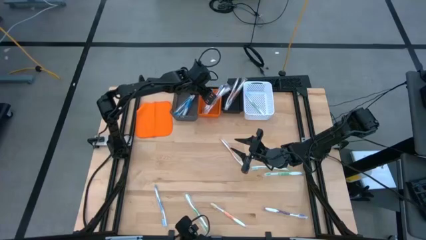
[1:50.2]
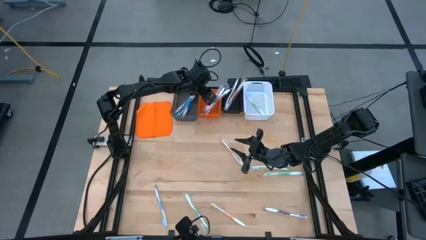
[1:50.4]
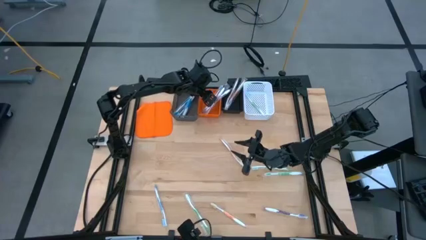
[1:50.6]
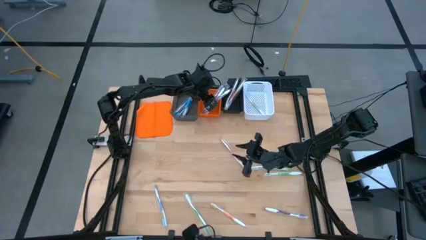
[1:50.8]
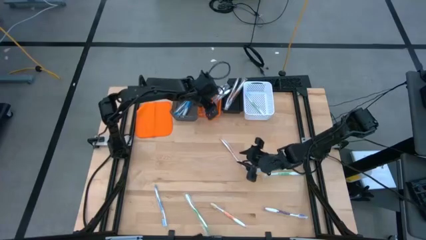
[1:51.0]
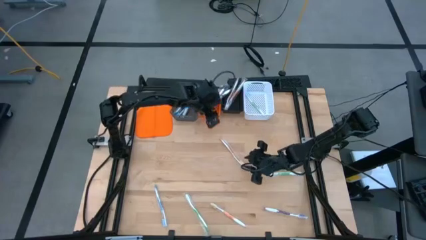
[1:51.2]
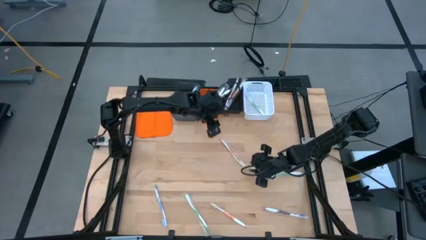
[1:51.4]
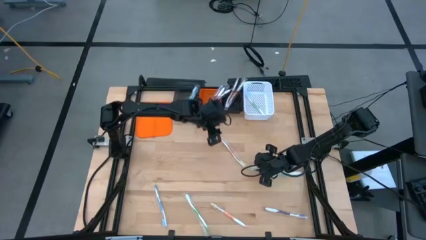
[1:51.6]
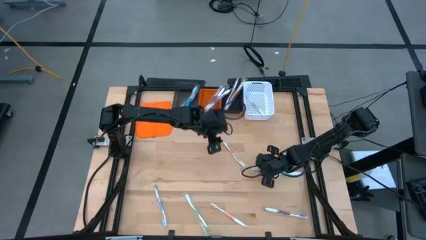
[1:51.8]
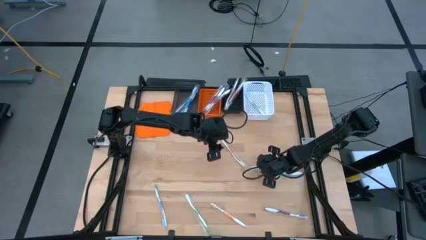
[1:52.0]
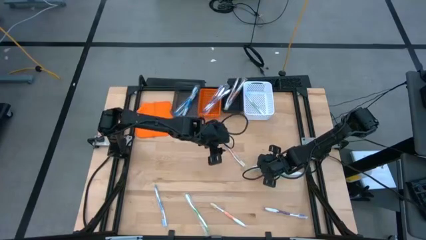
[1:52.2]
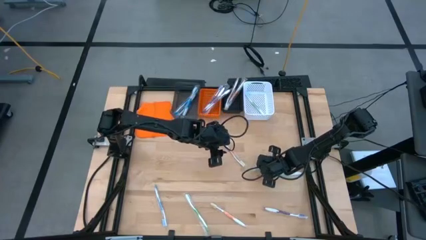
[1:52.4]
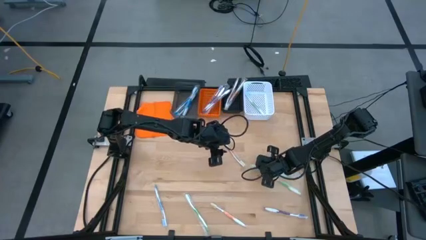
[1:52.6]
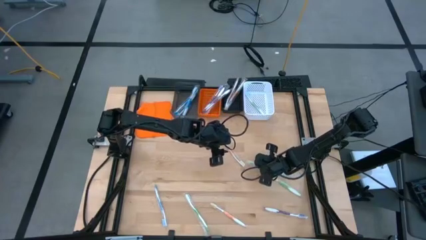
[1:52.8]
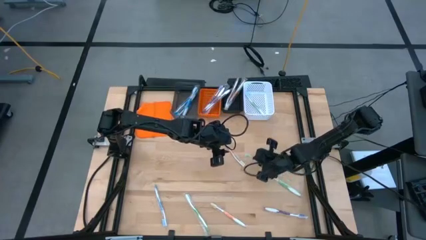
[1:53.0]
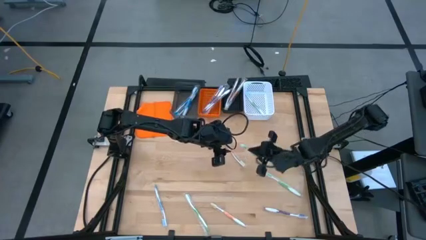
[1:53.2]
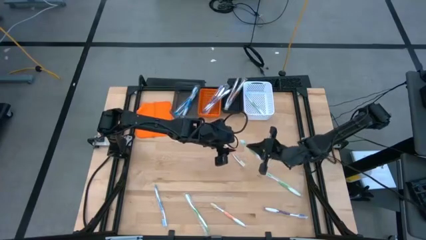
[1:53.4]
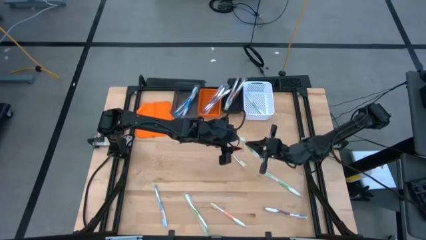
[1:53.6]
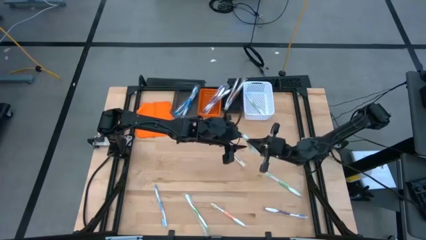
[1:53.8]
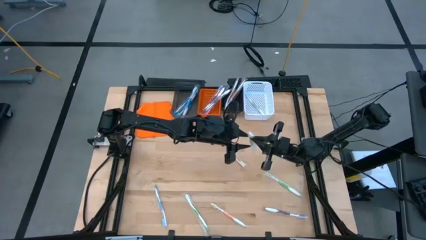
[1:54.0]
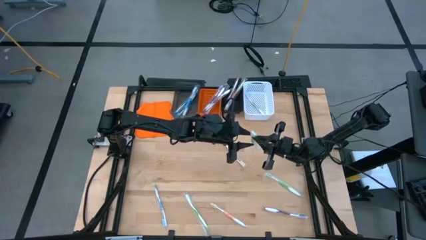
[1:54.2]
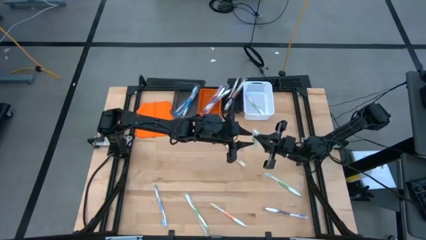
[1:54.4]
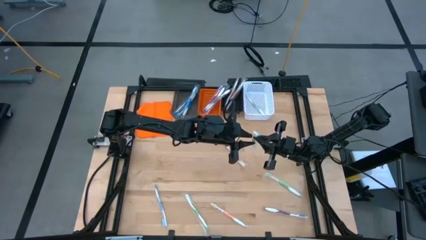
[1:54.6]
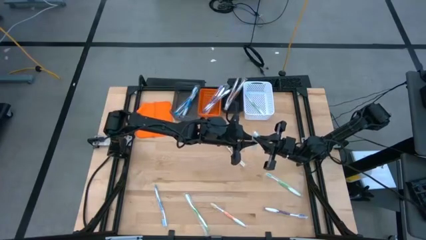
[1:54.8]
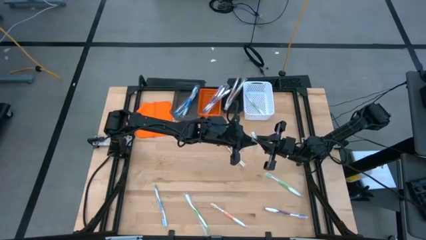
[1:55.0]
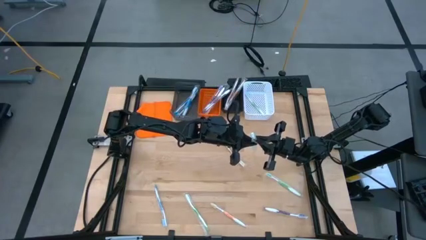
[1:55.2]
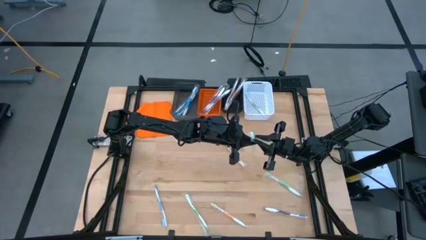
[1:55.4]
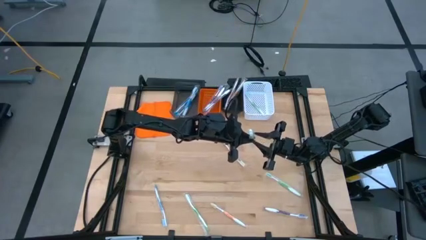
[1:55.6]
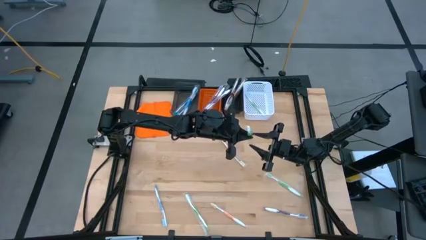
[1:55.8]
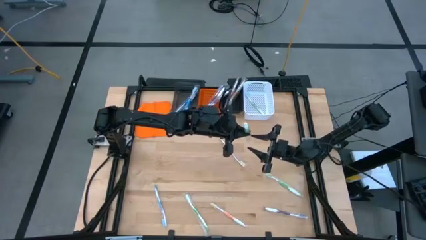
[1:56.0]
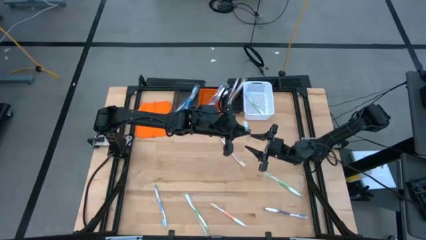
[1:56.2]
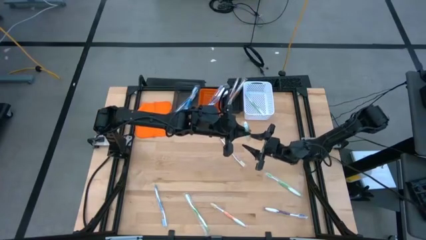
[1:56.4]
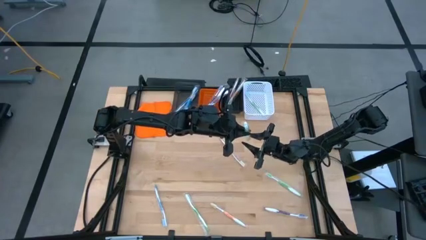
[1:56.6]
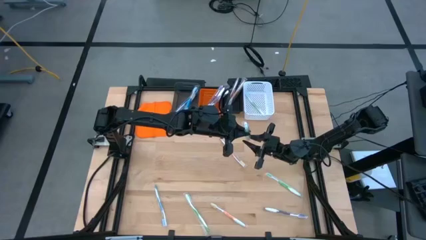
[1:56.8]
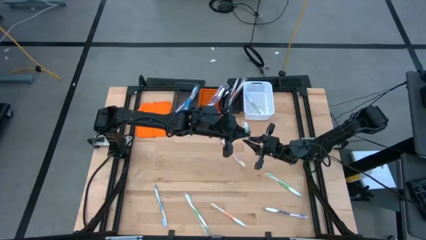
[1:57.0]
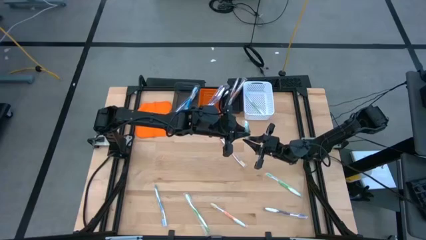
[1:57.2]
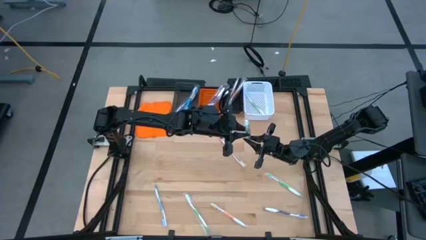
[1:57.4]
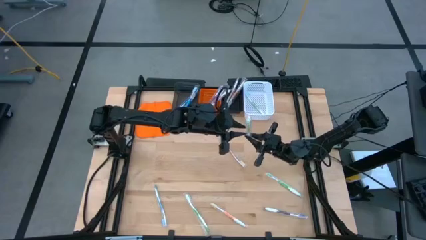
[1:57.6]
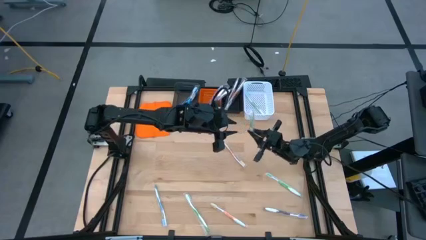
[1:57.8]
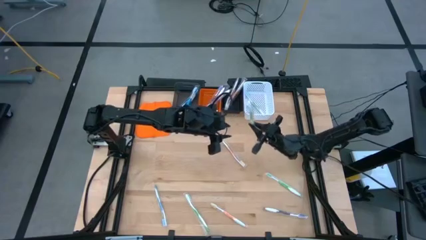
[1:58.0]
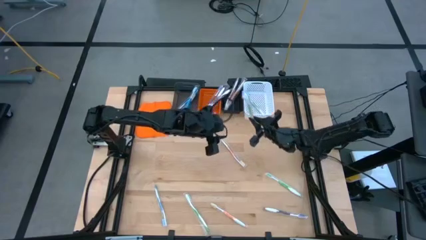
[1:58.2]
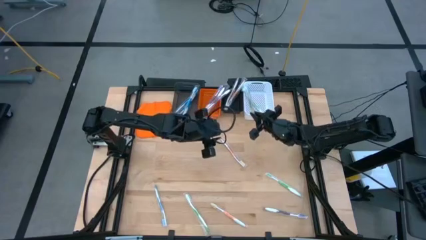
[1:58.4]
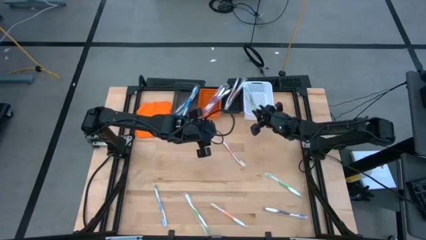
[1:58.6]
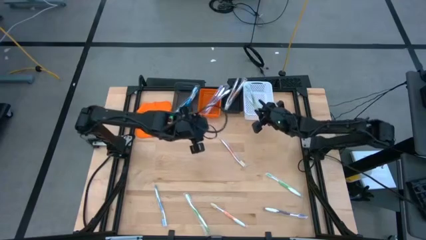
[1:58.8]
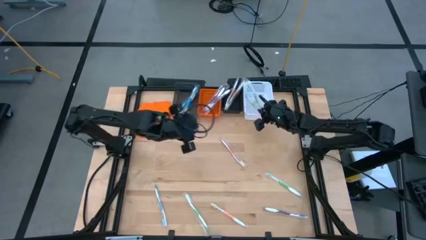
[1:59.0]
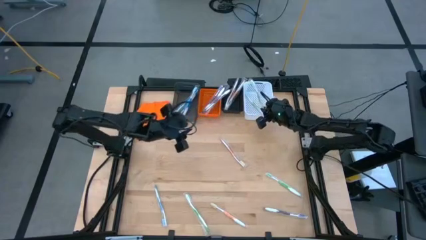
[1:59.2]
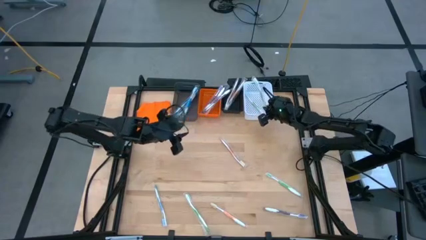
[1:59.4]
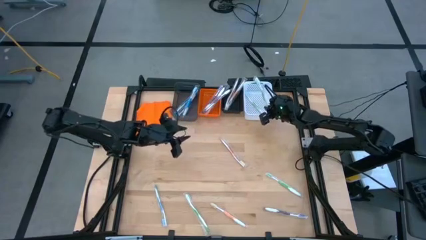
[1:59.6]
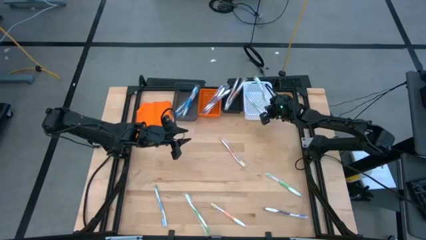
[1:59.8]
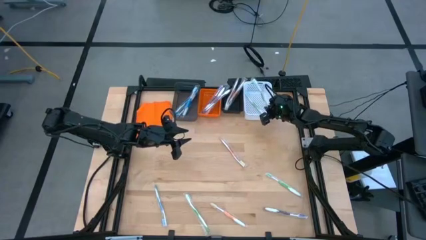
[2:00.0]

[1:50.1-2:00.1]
Task: Pick & Place Toothbrushes
Put the green toothbrush into the white bin

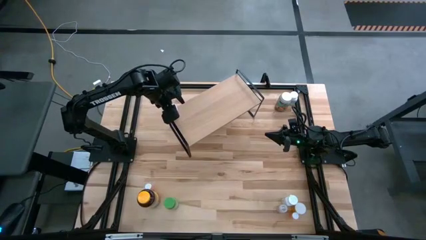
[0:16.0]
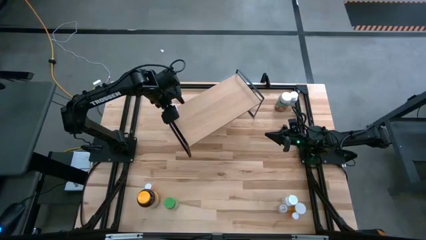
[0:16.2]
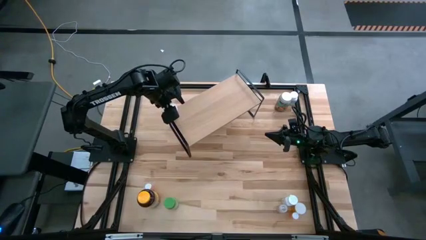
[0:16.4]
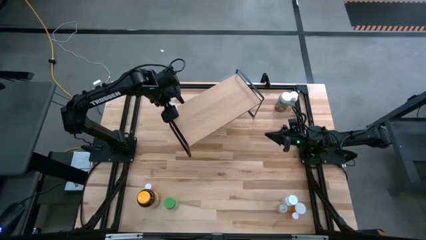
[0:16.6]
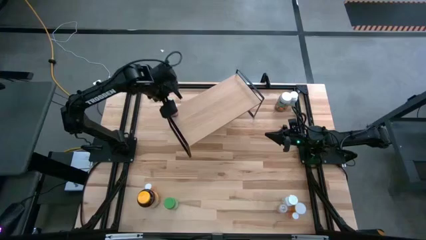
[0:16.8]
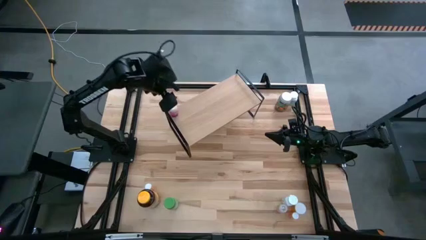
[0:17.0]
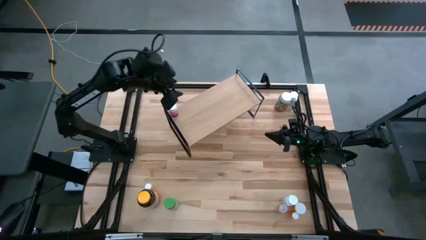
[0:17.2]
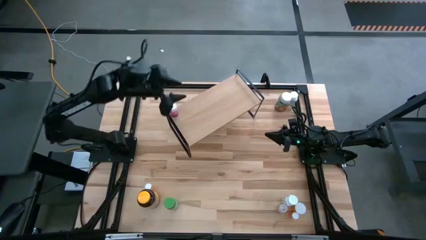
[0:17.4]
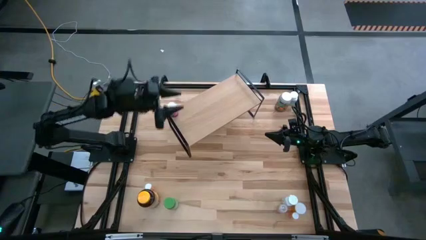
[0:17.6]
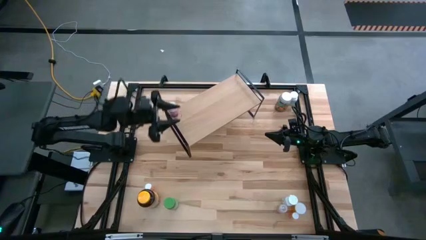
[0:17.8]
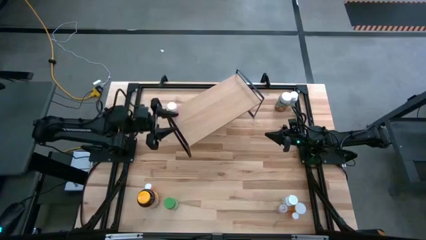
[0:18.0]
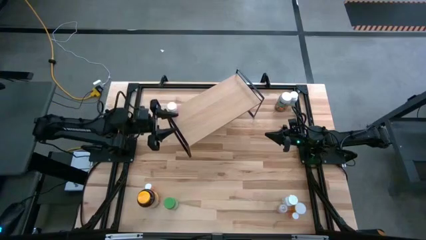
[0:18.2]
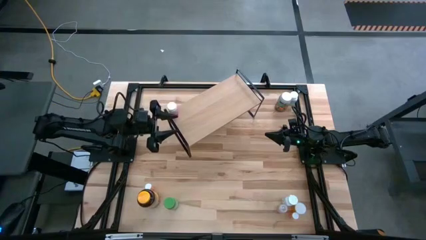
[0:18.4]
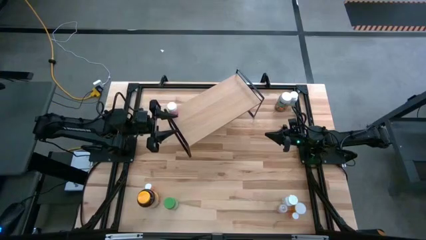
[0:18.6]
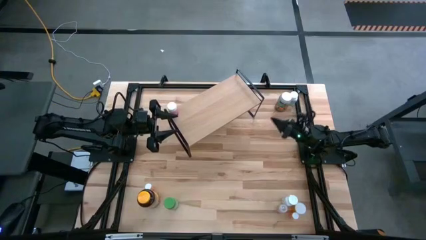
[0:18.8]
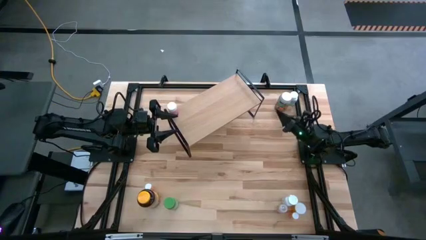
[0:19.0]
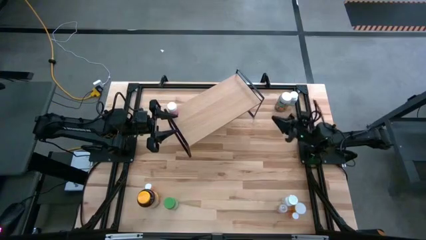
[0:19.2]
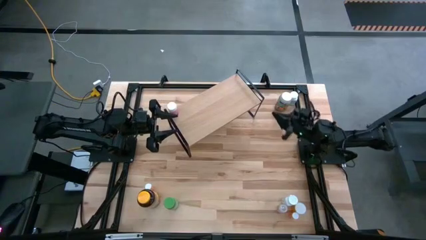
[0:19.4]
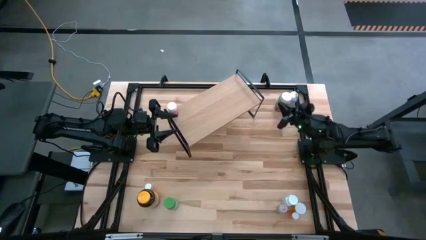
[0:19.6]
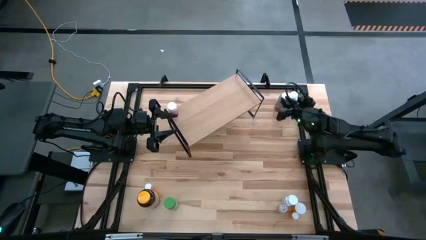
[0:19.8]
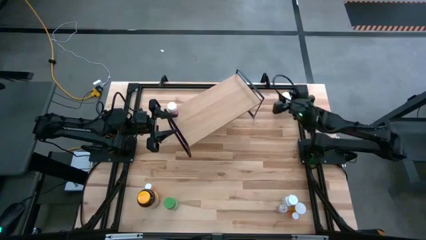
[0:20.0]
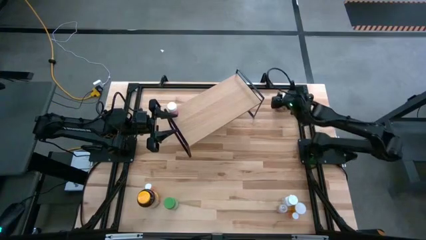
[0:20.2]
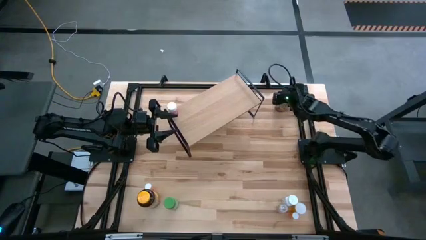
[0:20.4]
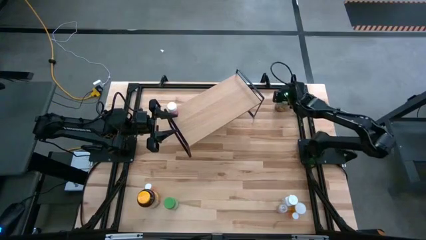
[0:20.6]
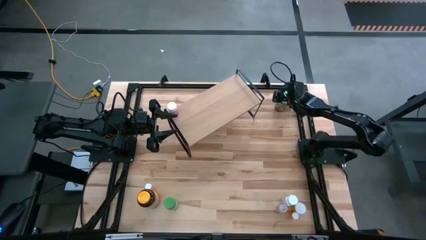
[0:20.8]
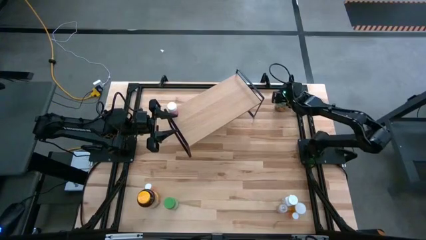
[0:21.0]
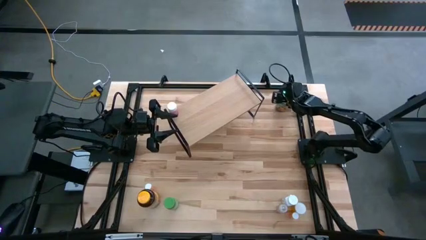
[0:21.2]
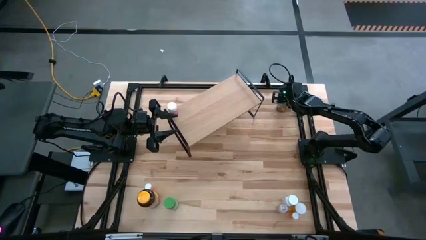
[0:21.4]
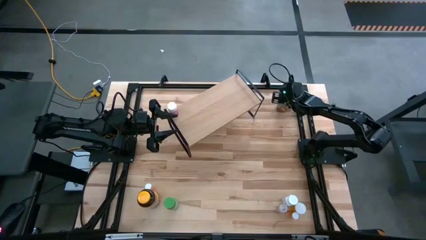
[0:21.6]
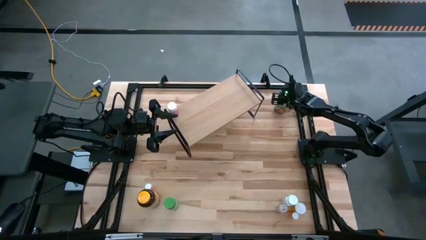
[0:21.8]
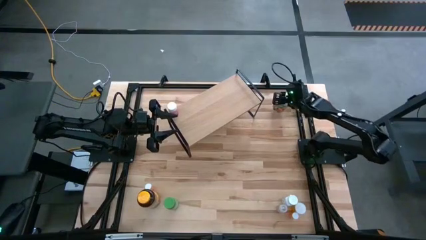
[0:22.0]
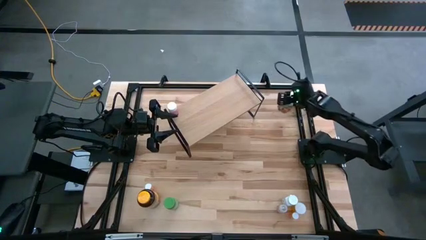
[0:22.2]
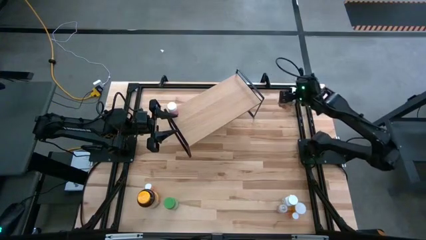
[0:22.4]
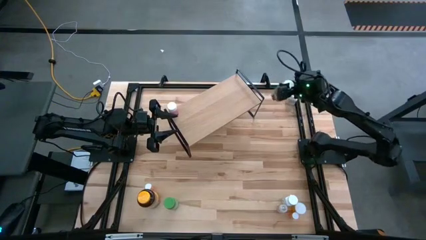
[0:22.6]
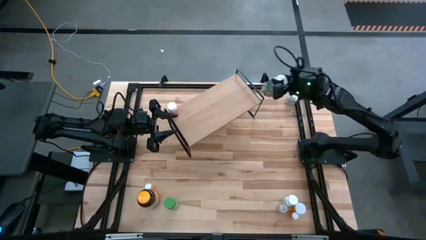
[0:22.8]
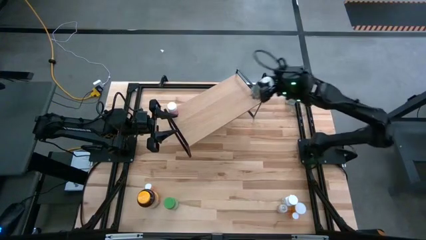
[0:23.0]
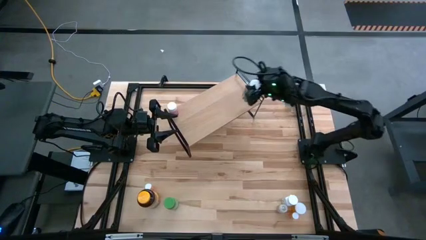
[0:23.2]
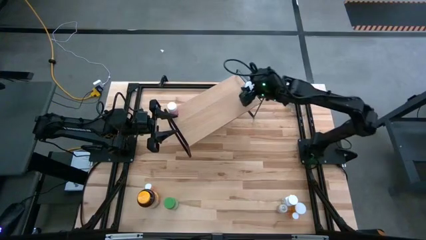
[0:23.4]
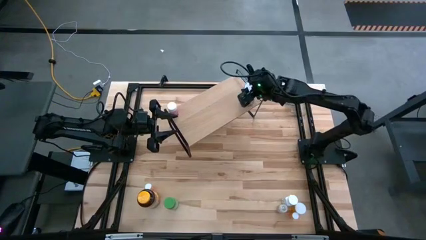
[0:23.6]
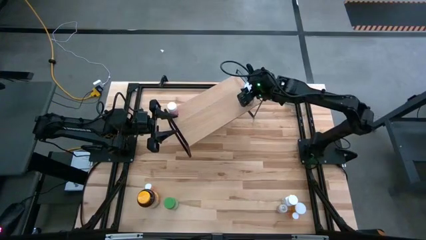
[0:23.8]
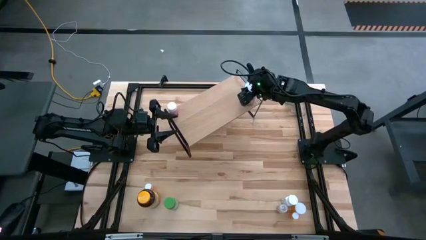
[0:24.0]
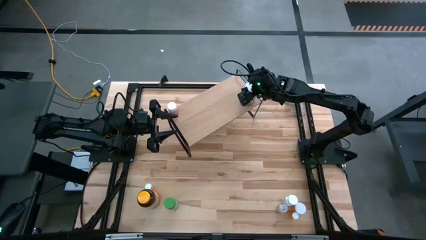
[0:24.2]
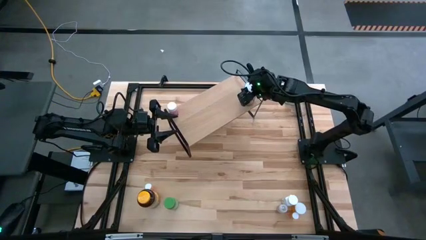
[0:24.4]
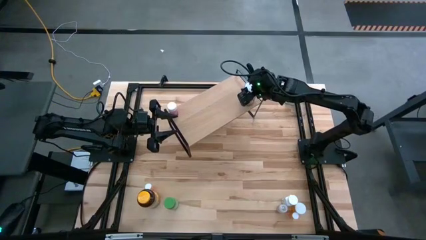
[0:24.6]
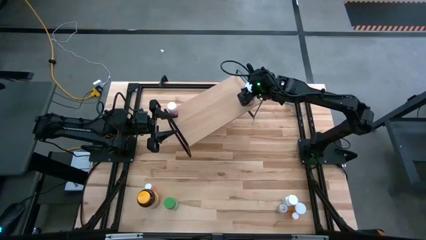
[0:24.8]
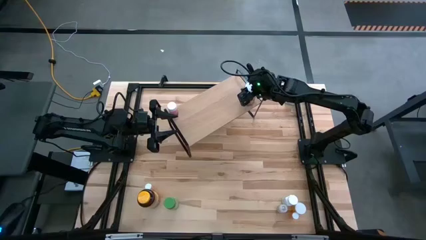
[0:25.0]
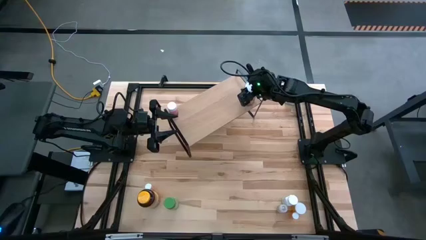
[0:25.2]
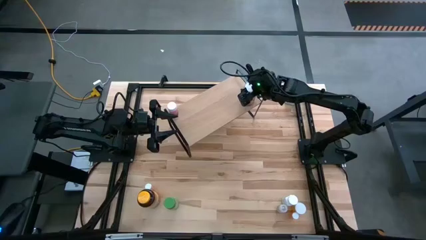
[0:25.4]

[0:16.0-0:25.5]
Task: Pick and place medicine bottles onto shelf by color
Put the green medicine bottle on the shelf
